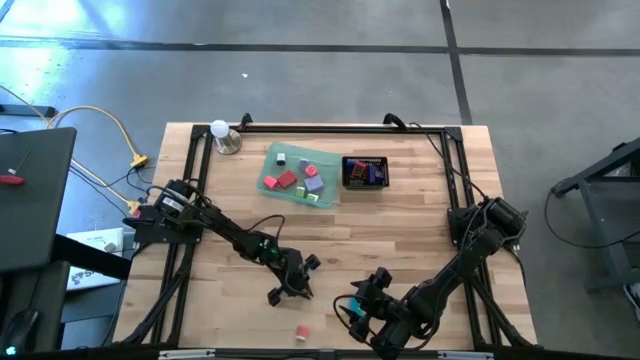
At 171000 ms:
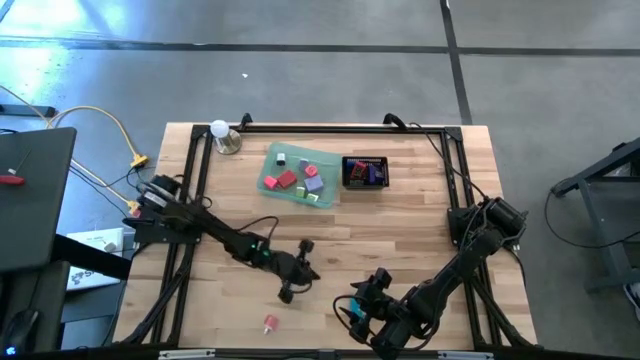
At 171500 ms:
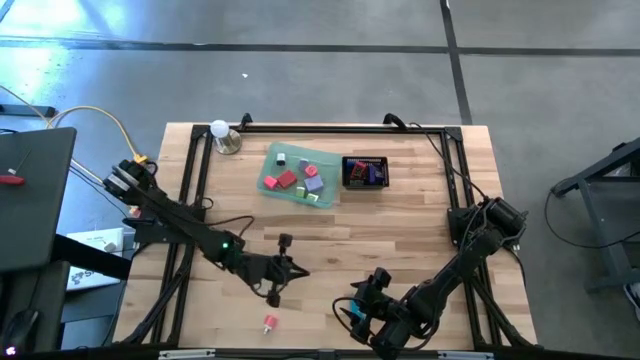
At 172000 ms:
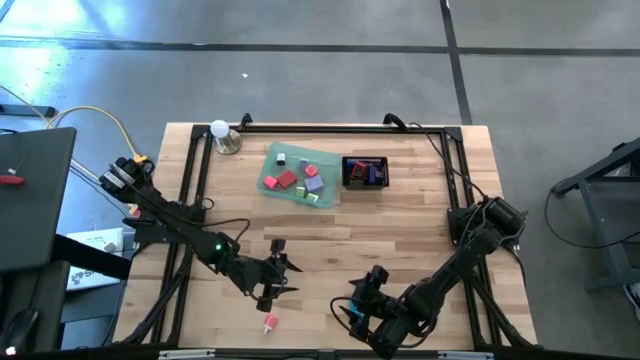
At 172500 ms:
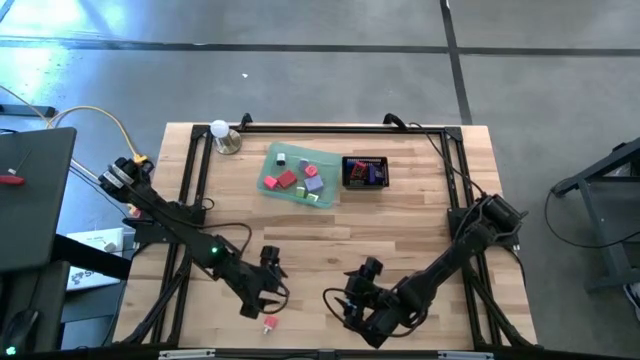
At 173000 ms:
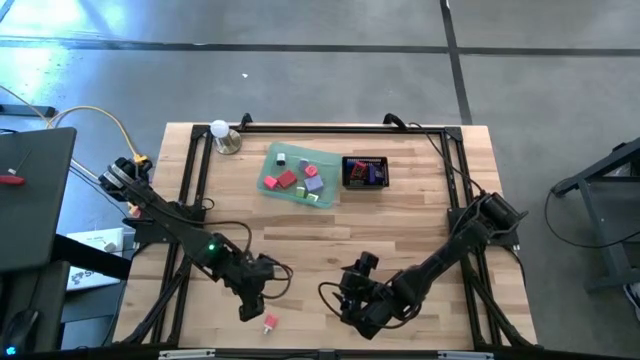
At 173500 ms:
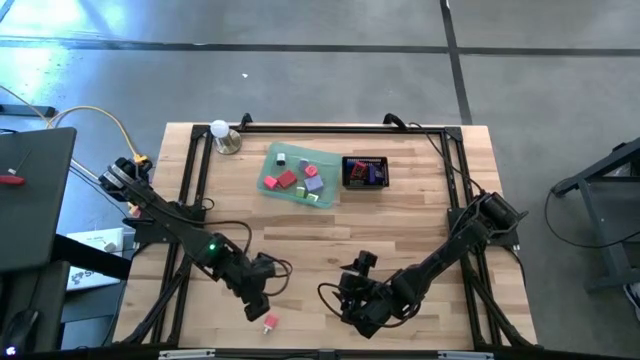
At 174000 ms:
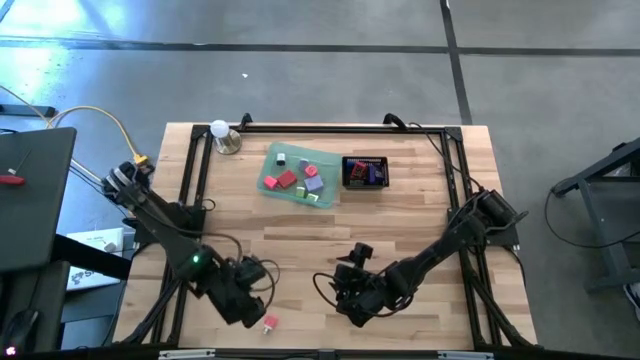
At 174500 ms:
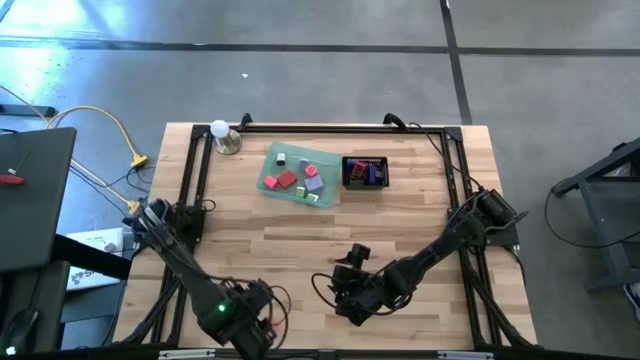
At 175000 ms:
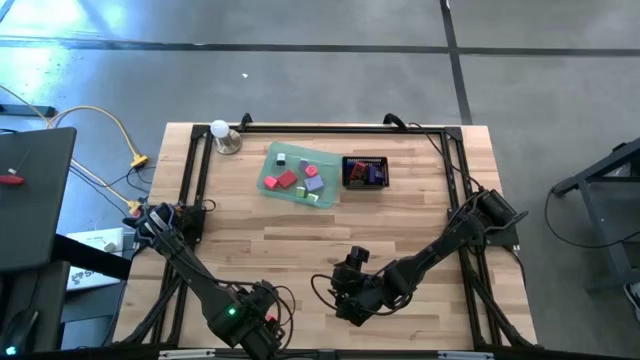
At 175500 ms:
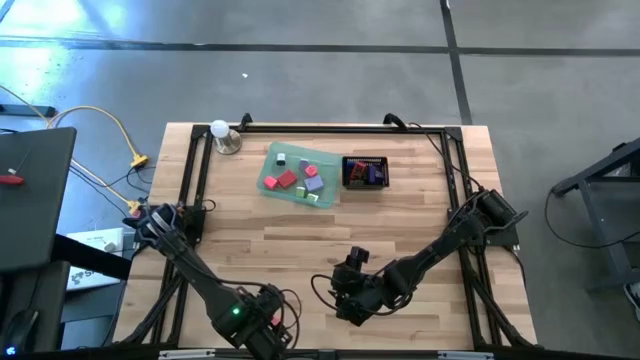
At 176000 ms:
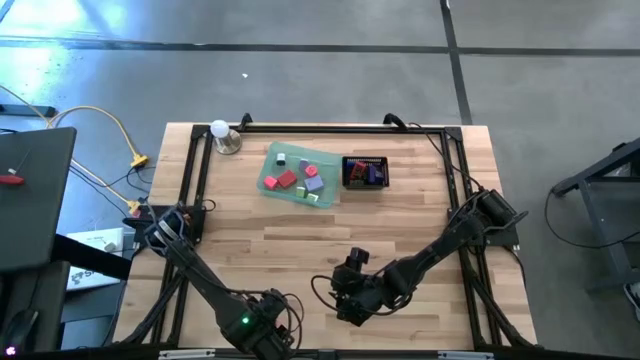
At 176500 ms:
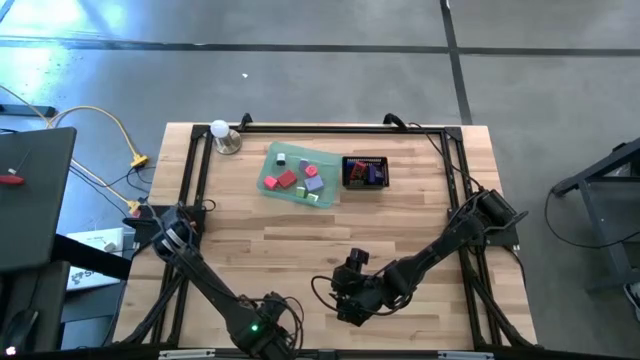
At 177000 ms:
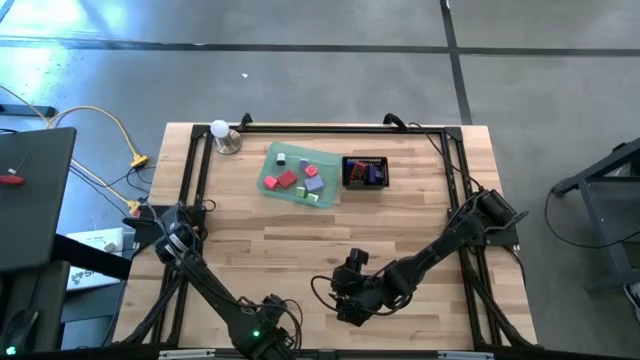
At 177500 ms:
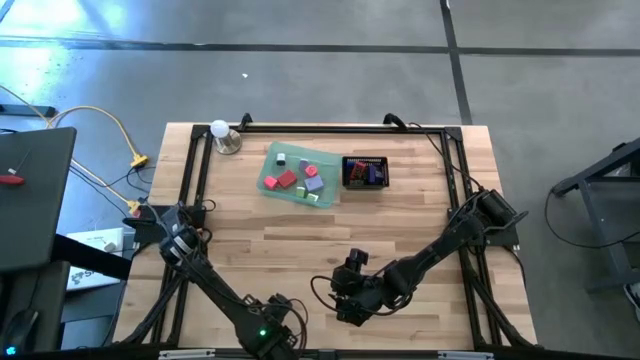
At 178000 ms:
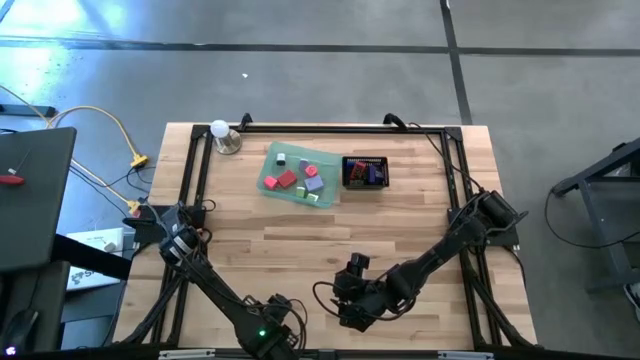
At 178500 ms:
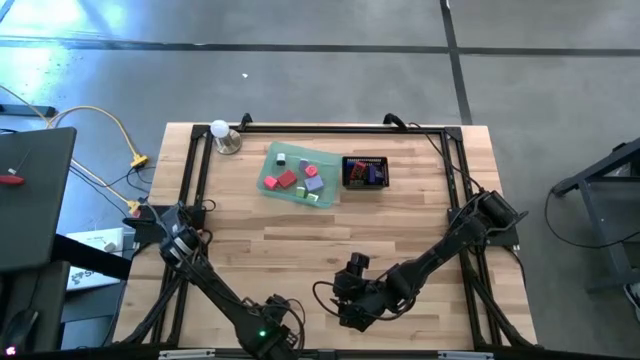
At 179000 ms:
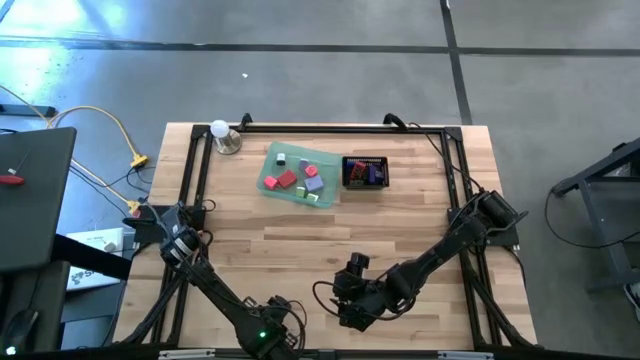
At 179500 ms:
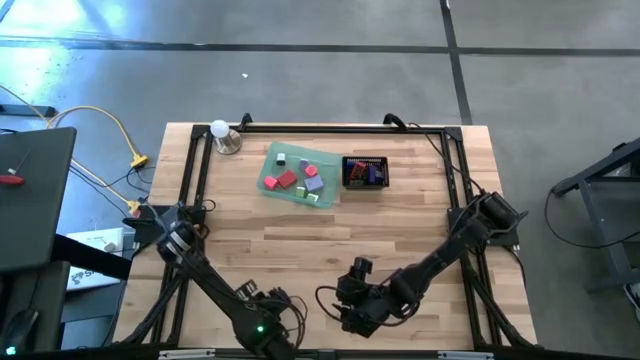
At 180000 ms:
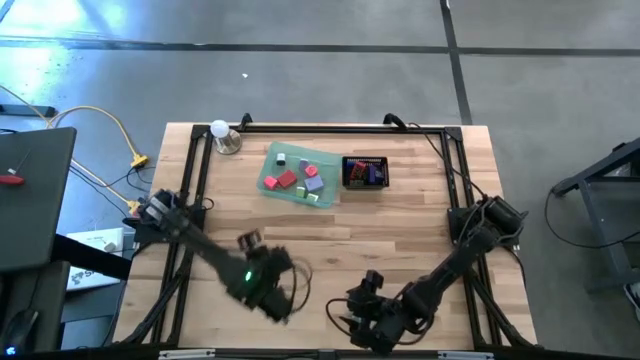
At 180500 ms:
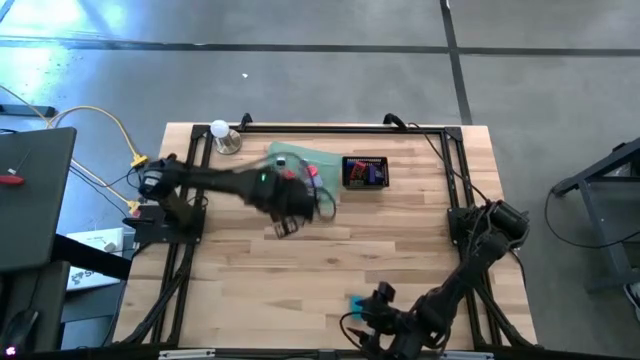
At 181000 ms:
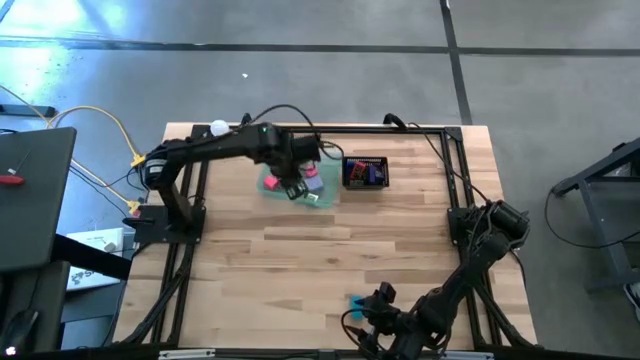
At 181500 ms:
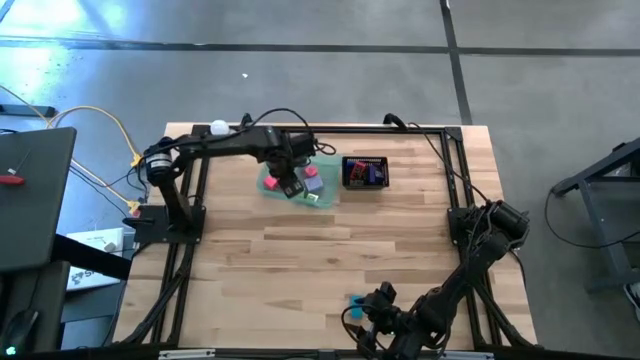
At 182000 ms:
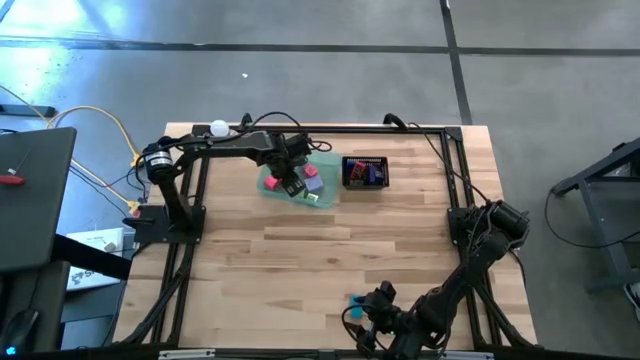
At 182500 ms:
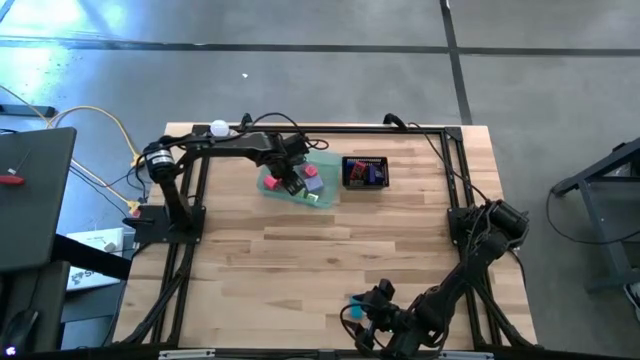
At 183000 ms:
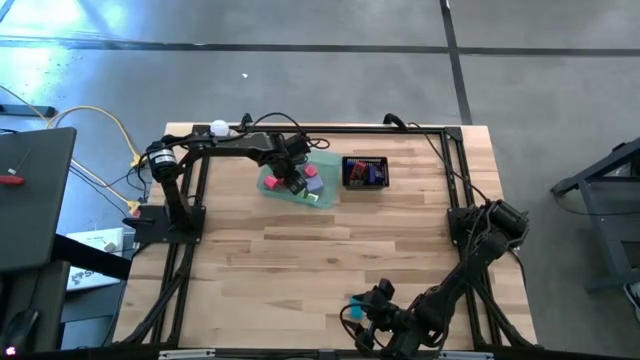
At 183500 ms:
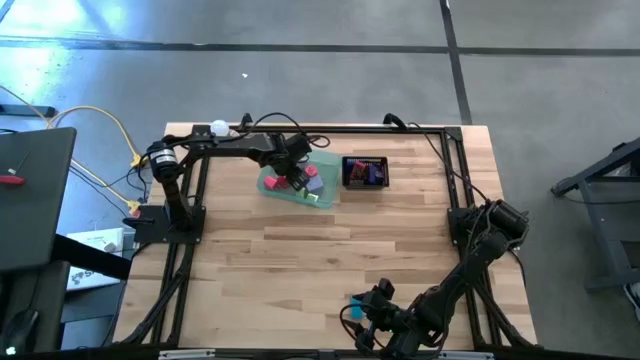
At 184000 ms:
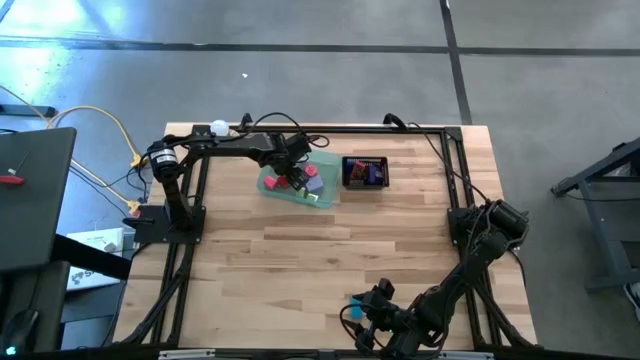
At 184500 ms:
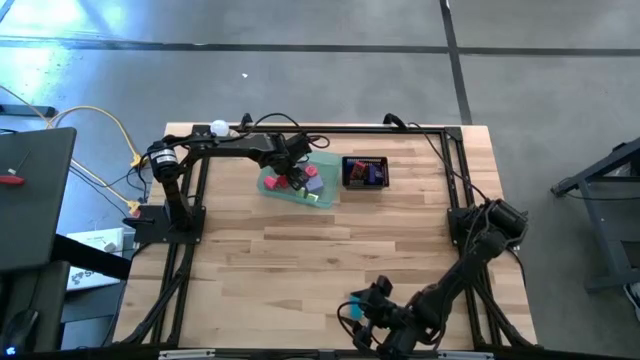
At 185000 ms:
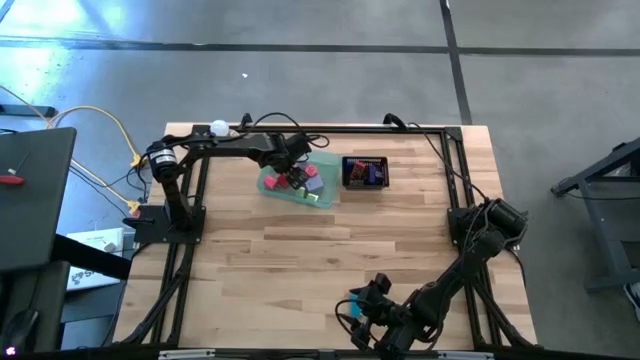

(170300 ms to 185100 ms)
Task: Pick & Place Office items
Put the pink white charger adapter into the green bin

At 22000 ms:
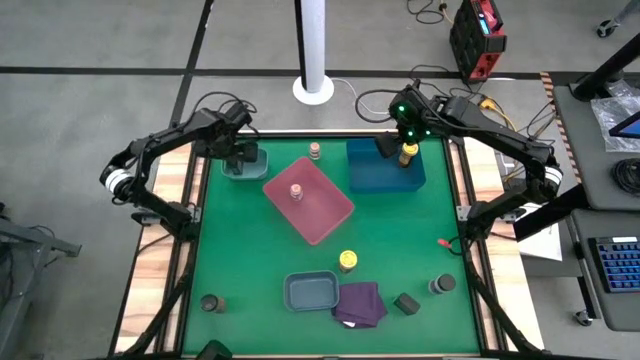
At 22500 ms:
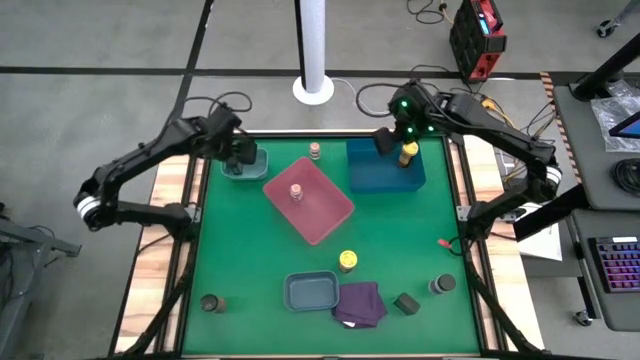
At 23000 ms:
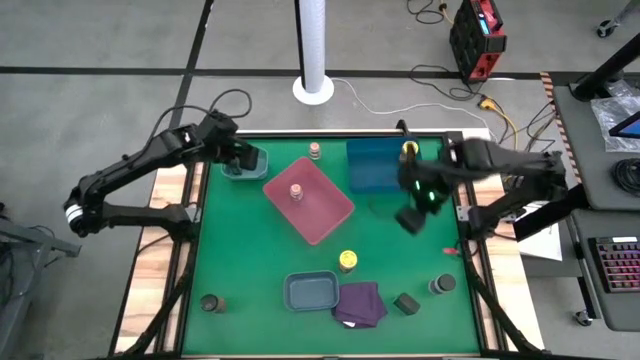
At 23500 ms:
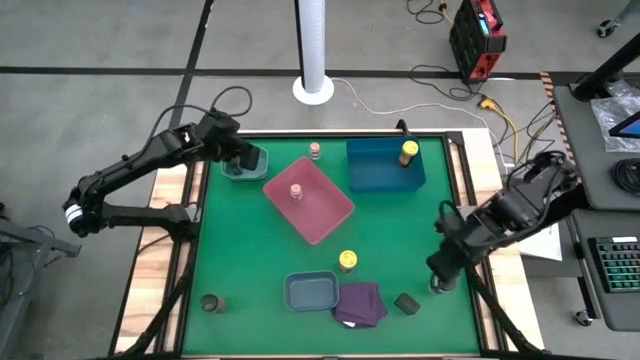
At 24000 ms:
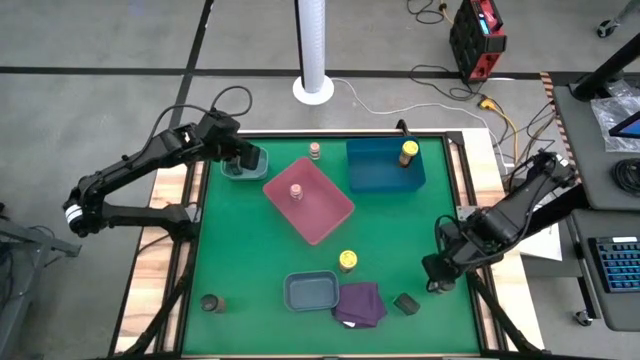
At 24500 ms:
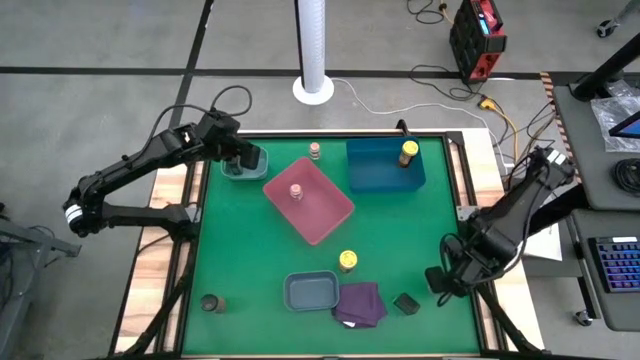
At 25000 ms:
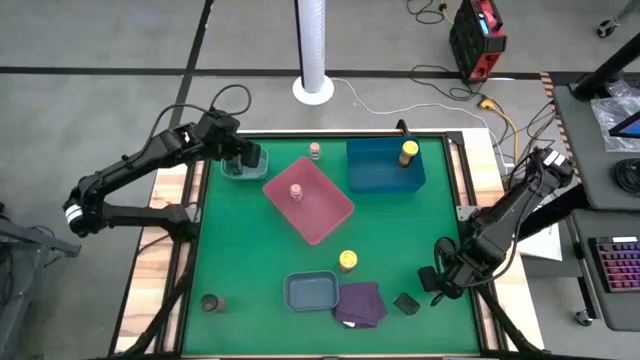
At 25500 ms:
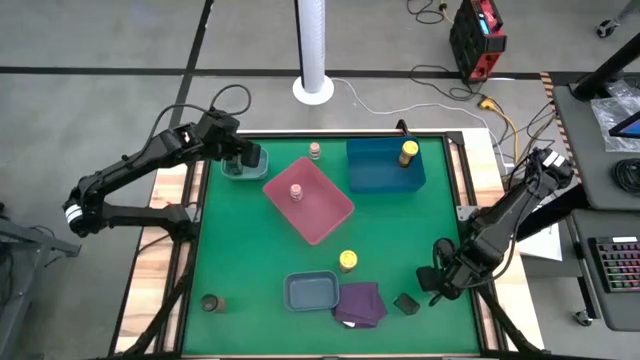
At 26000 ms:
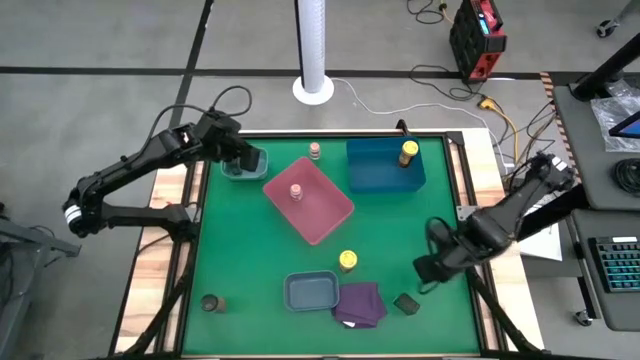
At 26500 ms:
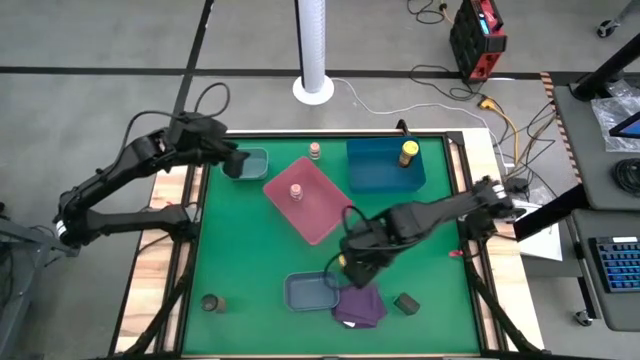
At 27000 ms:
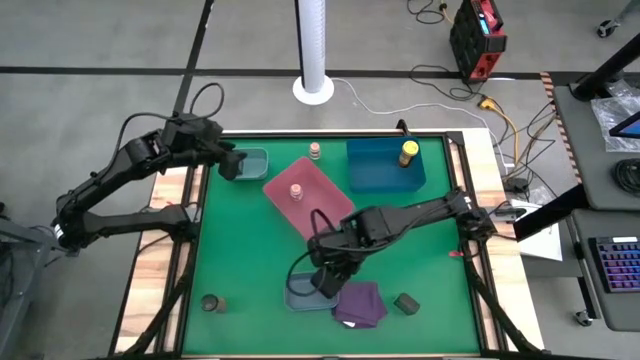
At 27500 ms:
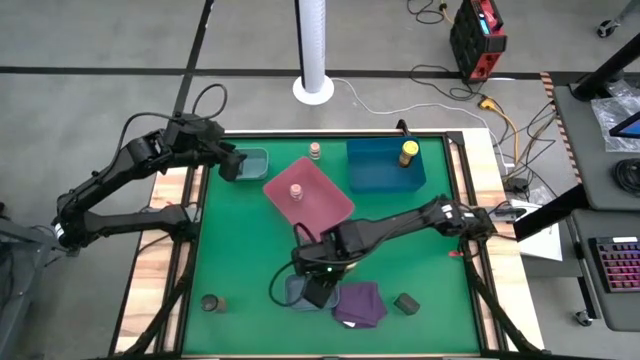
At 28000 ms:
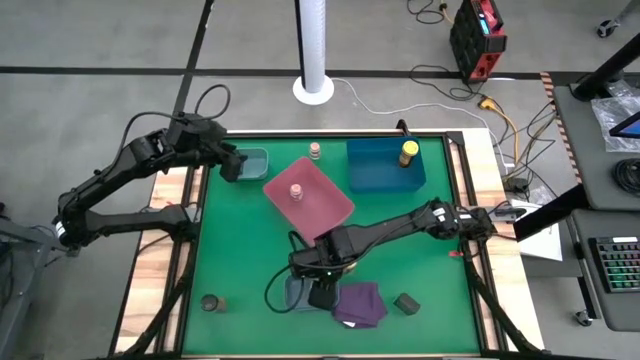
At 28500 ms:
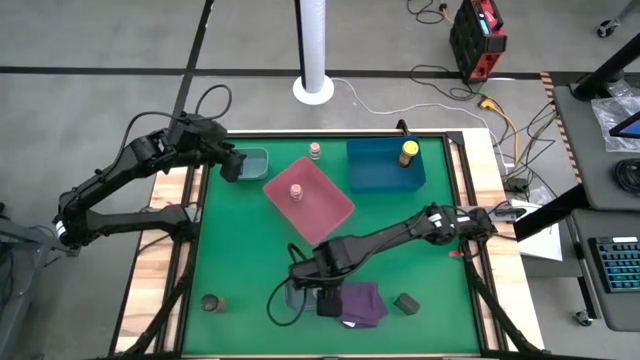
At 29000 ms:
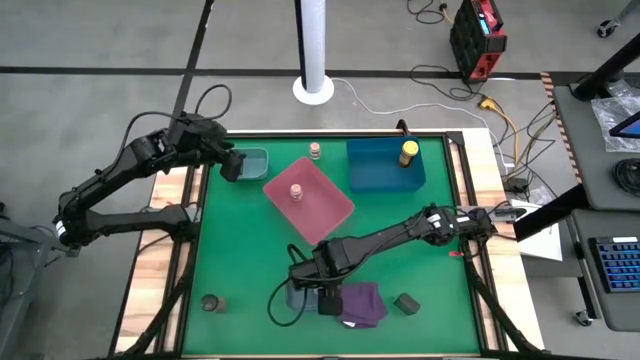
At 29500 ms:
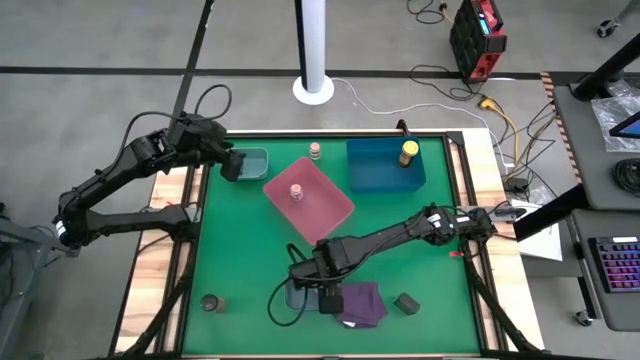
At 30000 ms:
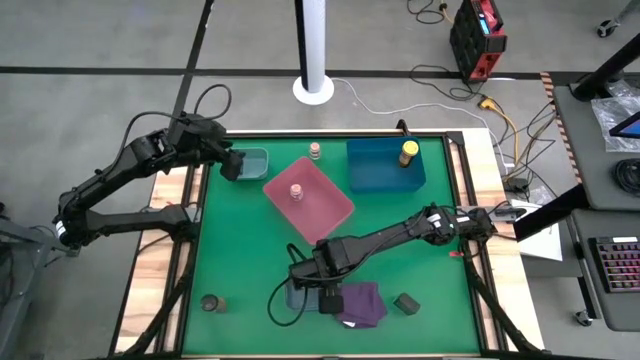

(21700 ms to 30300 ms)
Task: Sort spices by type
Put the violet seasoning bottle into the gray bin
